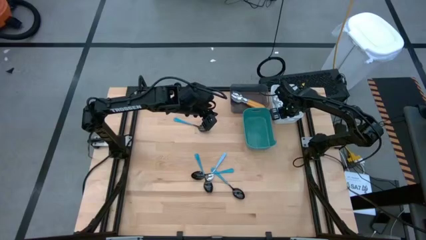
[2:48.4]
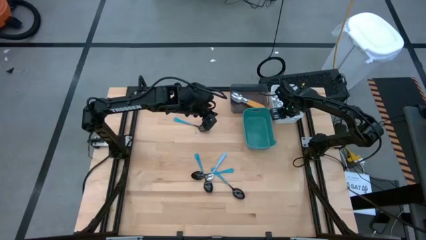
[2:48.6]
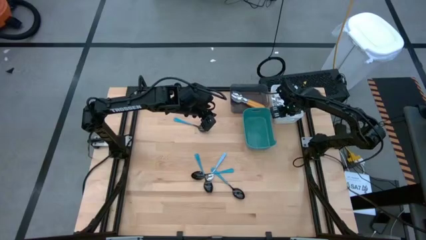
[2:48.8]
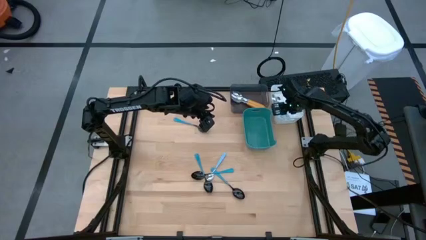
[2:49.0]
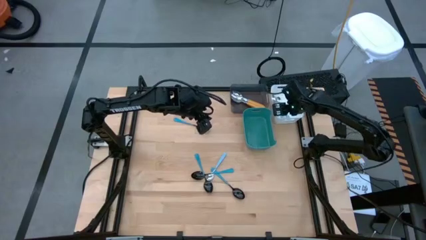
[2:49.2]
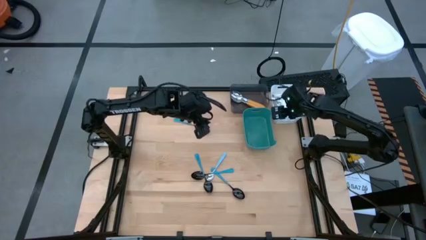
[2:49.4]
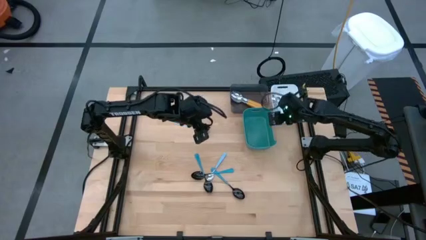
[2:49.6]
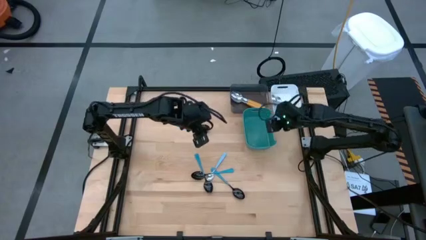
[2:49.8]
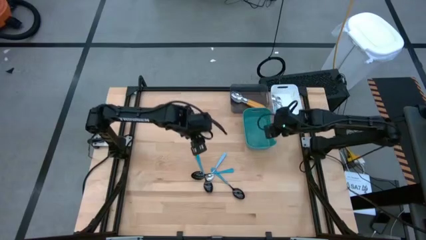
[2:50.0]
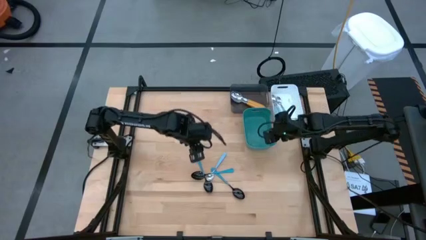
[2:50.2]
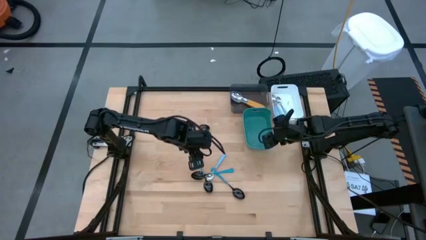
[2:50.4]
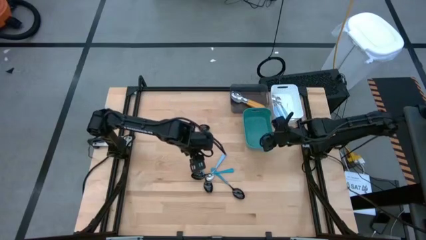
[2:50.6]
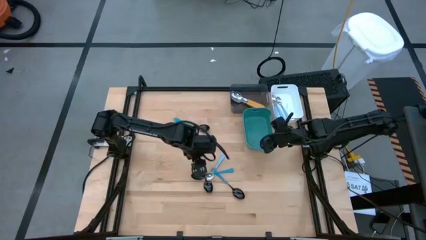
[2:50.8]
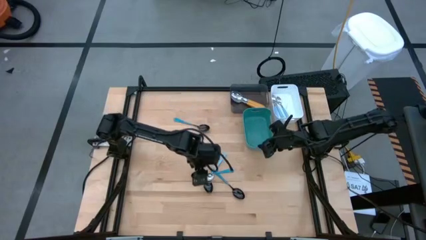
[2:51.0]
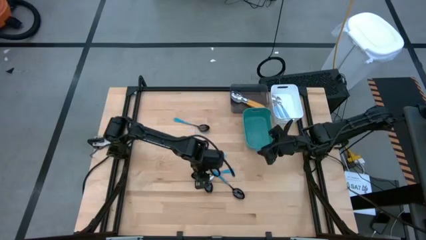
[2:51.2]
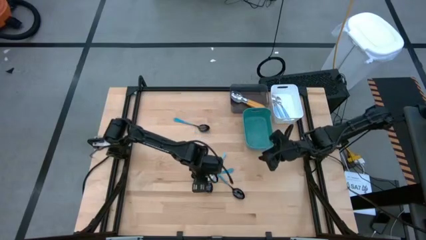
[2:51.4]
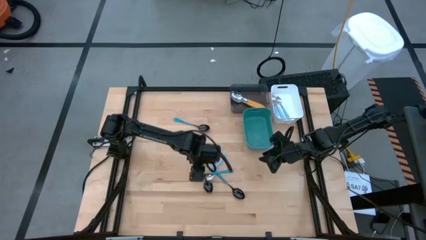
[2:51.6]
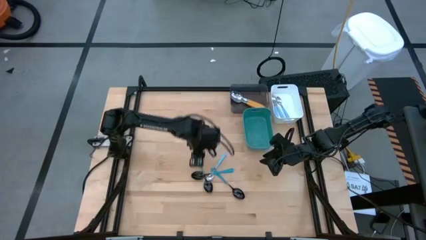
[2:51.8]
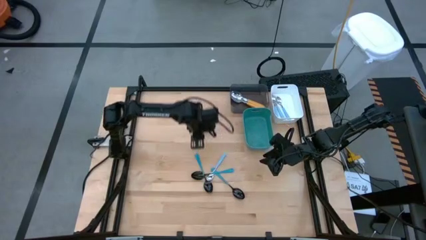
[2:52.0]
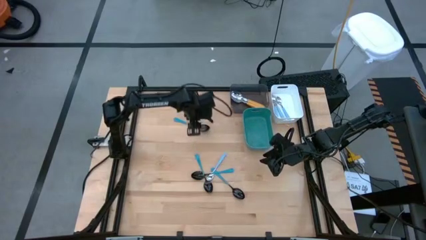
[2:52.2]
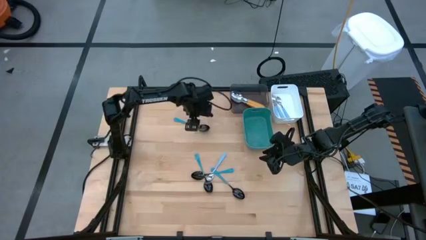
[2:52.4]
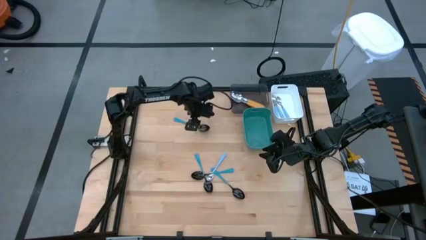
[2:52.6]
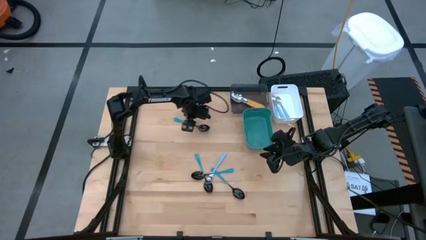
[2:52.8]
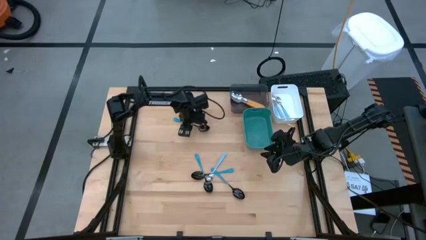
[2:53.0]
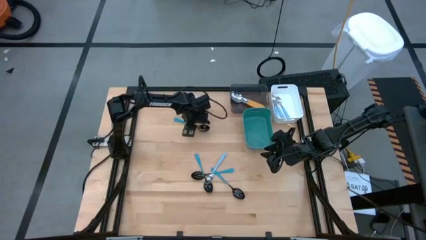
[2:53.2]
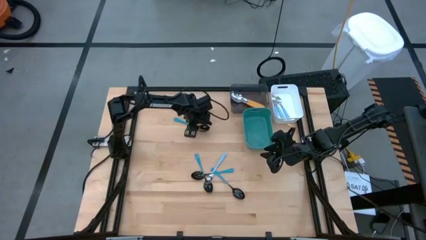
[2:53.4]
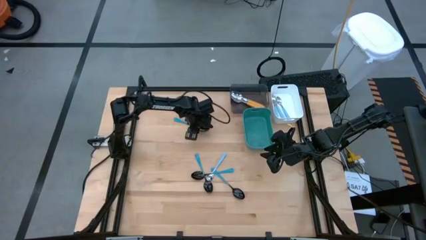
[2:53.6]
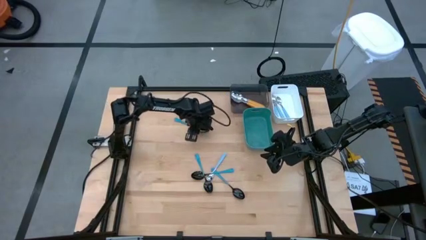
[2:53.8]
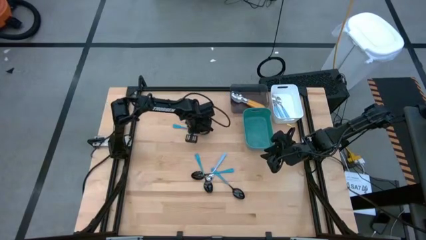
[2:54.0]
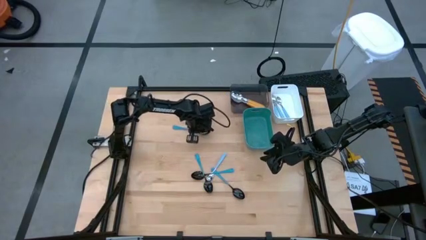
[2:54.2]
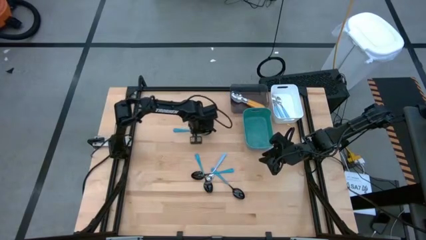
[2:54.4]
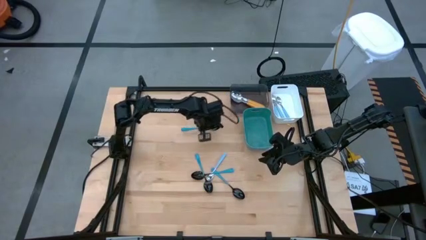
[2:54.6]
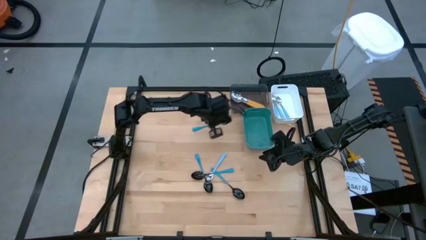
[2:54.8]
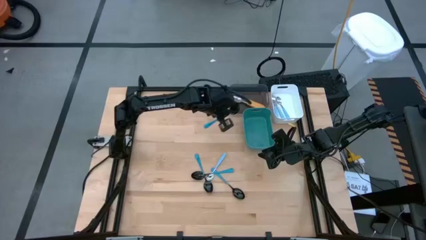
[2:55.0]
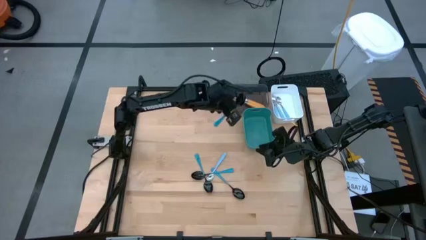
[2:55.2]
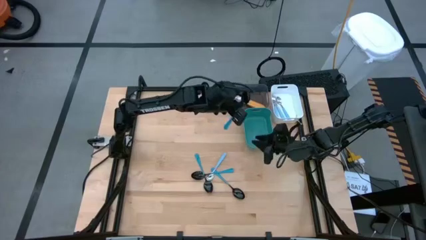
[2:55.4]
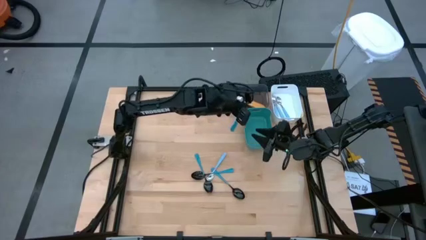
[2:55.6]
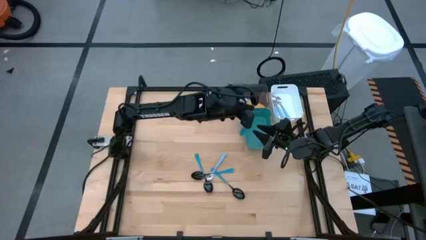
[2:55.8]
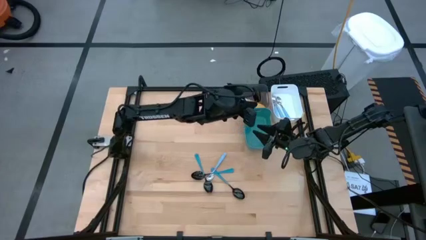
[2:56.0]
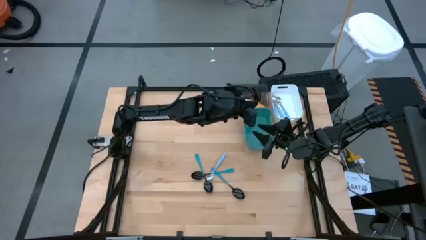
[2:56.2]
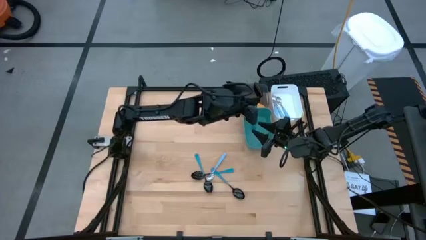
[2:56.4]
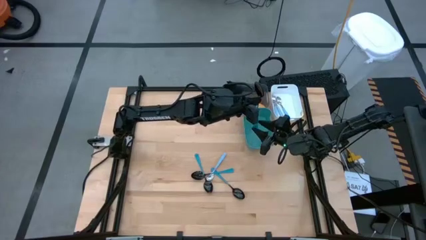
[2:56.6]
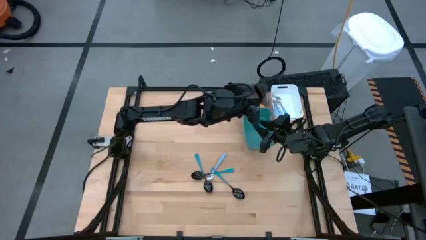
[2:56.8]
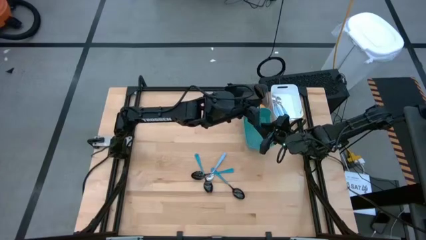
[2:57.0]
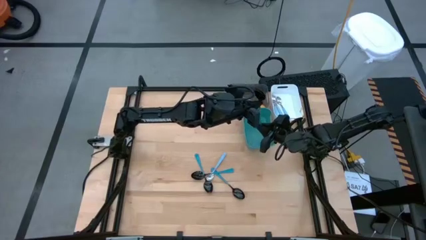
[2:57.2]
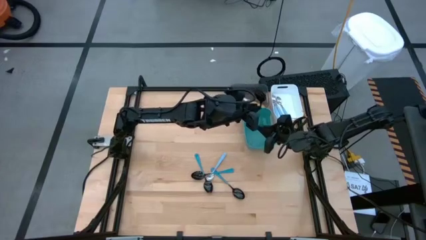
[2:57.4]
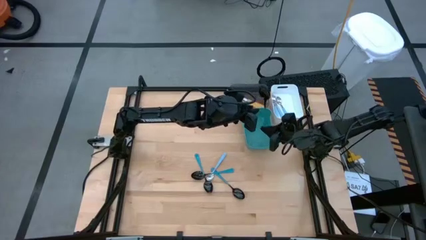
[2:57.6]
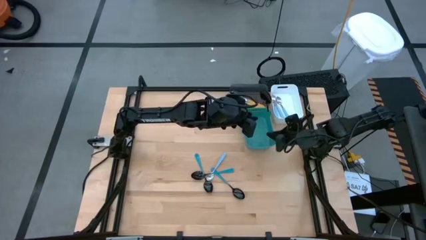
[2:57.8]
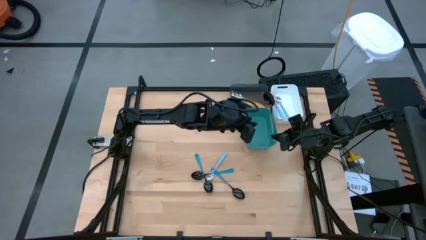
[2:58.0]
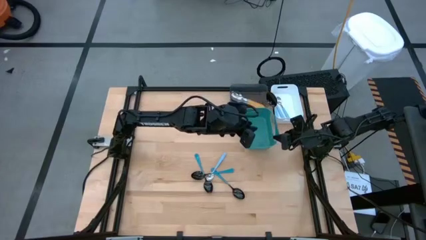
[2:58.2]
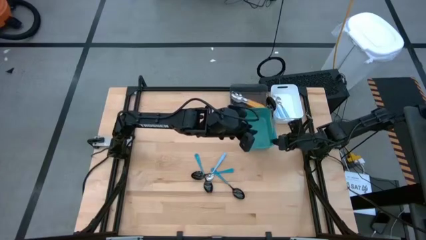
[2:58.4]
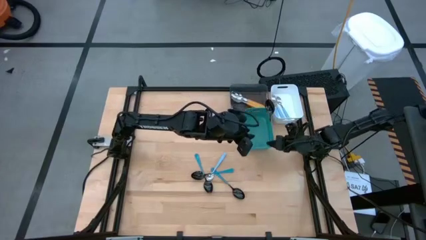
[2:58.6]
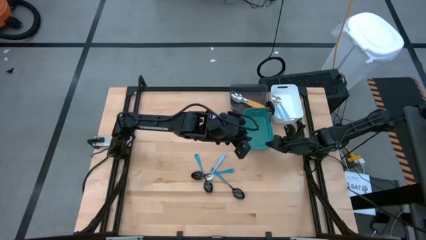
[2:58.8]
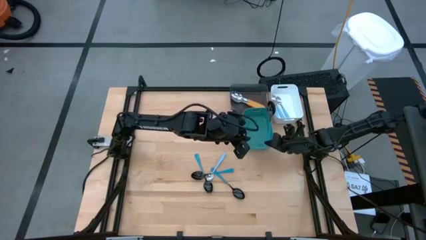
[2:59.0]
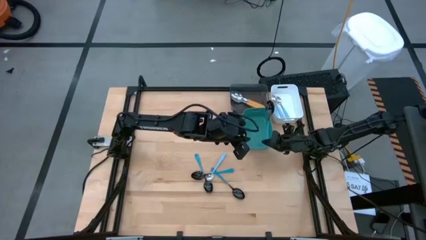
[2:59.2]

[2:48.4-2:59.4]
Task: Sort silverware by color (type)
Put the blue spoon into the green bin

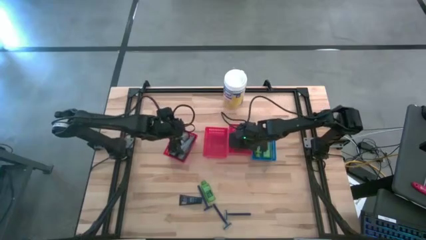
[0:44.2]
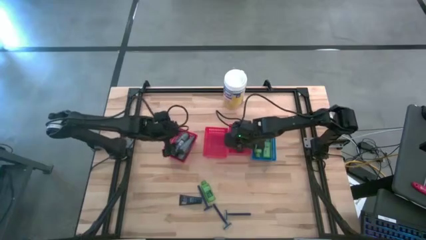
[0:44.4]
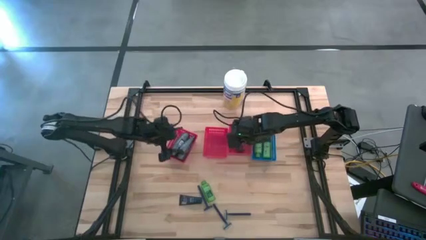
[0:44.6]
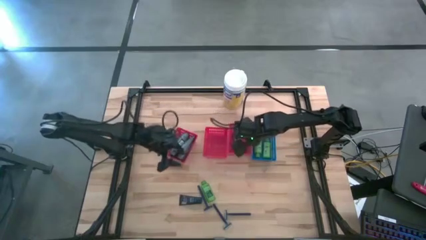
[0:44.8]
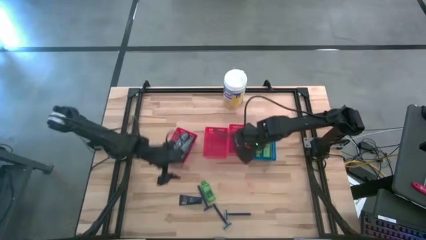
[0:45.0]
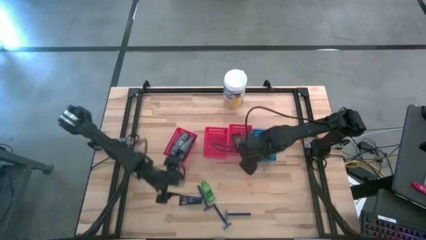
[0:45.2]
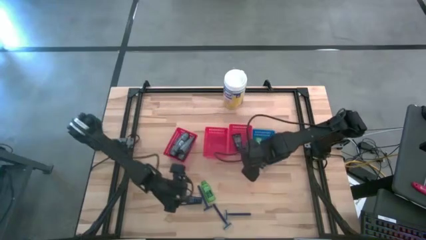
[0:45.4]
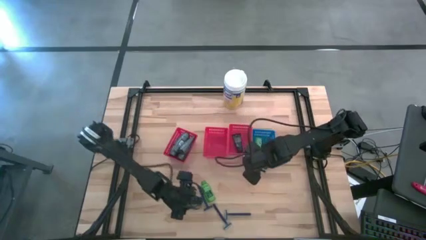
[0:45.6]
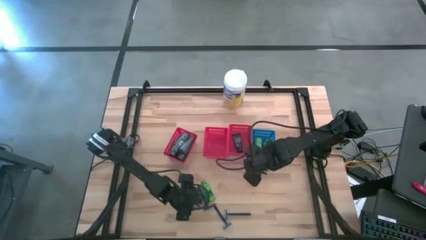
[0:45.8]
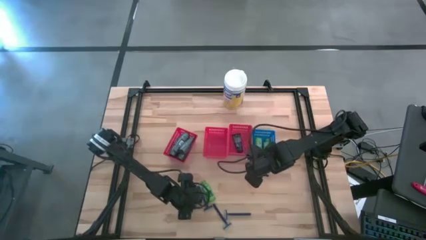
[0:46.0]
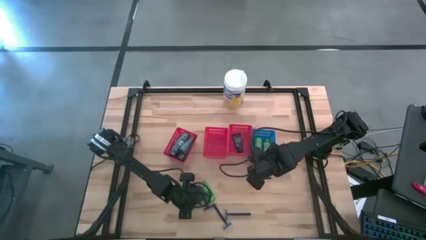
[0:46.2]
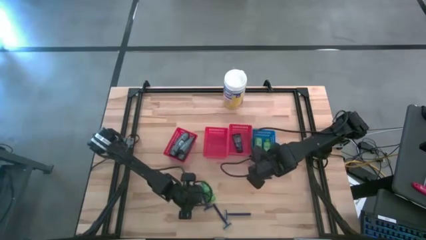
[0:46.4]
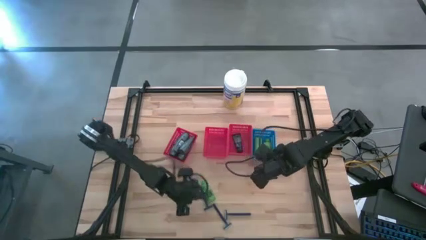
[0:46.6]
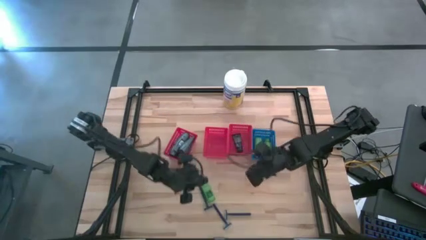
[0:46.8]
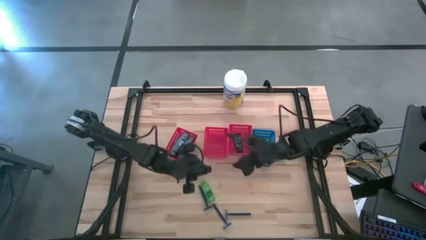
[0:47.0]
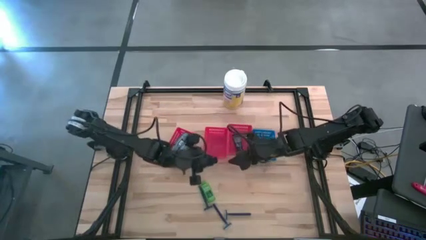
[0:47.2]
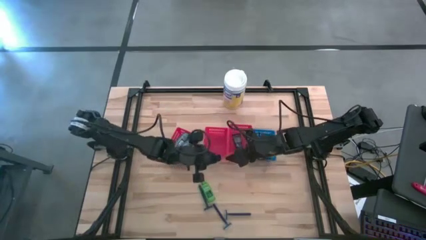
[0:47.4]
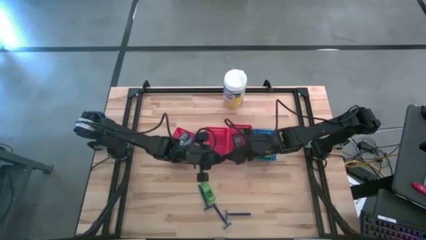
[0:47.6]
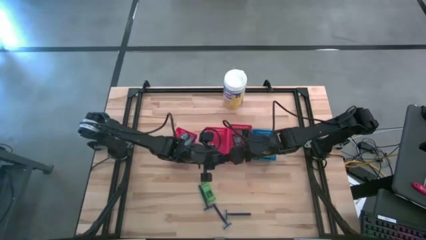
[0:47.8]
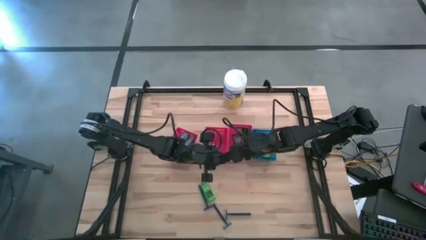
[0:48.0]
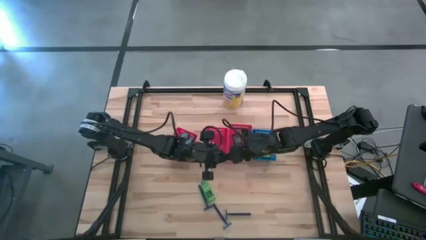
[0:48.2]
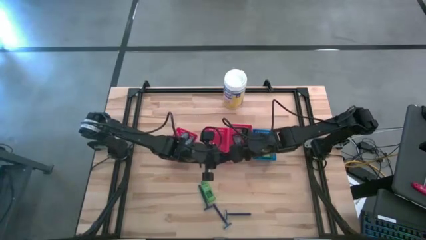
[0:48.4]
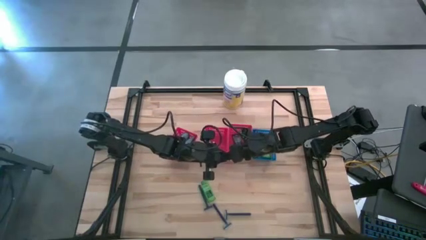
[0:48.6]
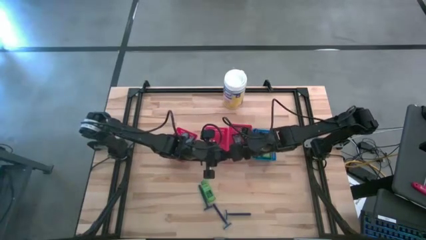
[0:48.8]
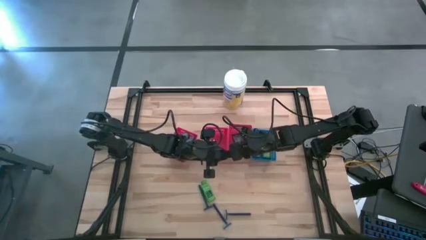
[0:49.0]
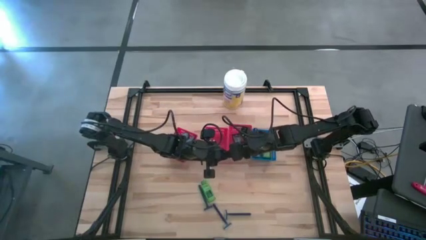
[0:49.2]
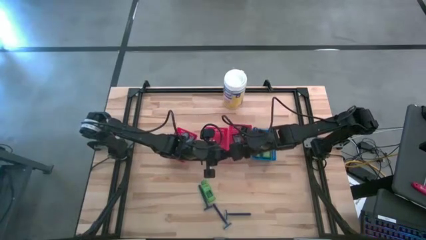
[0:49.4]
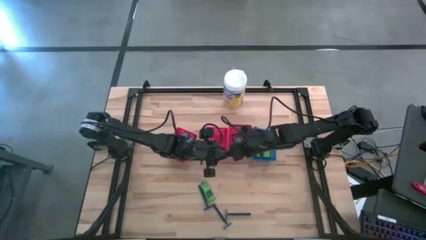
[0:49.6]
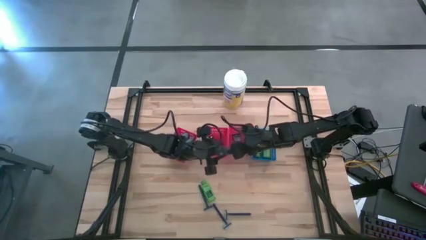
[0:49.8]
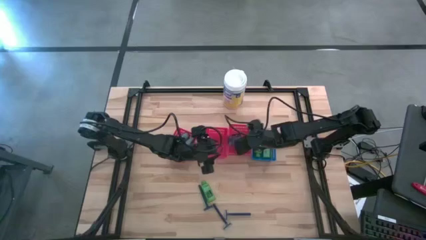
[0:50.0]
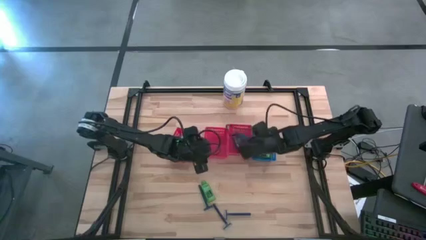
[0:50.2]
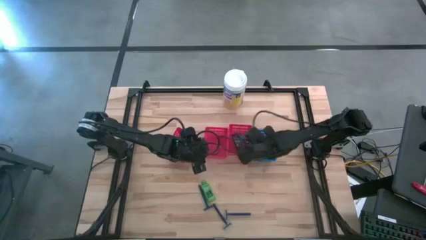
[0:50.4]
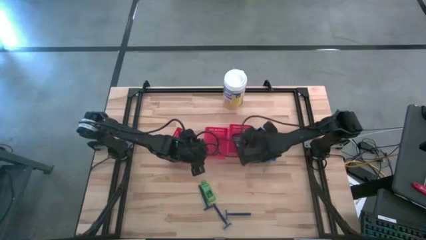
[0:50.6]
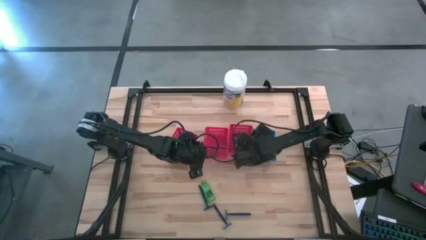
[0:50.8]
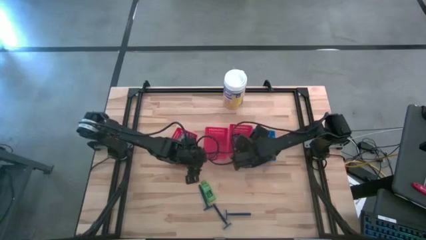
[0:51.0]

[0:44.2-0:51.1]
Task: Pick & Place Travel size toiletries
Put the blue shave cream into the right red bin
